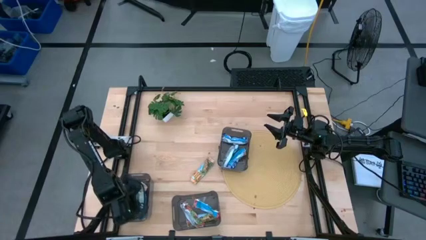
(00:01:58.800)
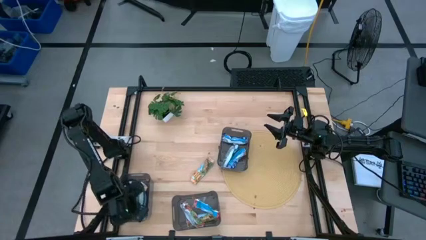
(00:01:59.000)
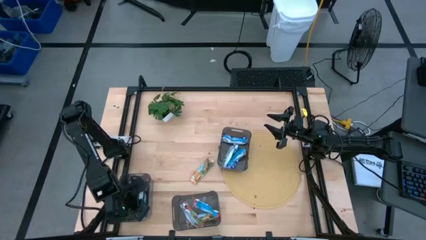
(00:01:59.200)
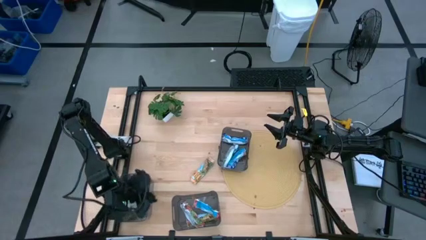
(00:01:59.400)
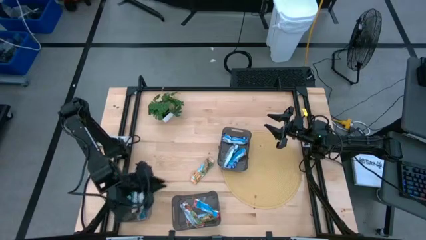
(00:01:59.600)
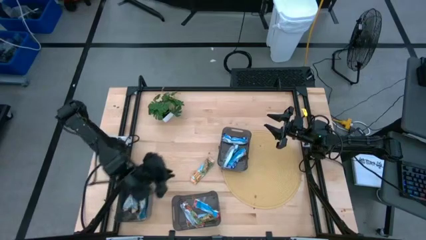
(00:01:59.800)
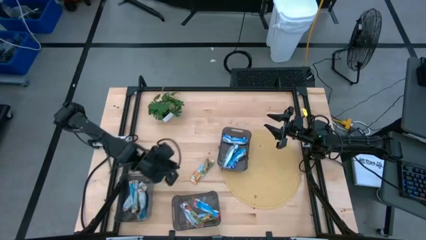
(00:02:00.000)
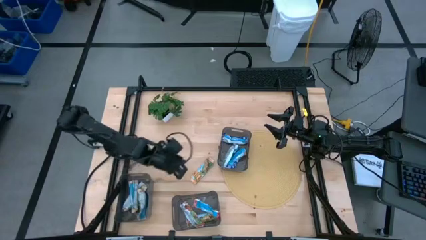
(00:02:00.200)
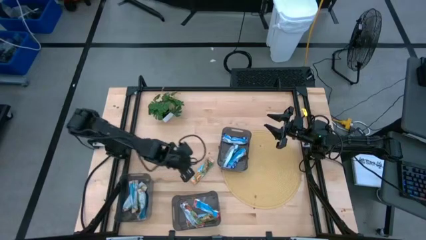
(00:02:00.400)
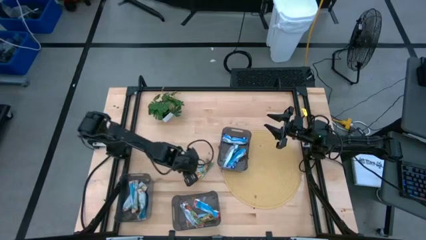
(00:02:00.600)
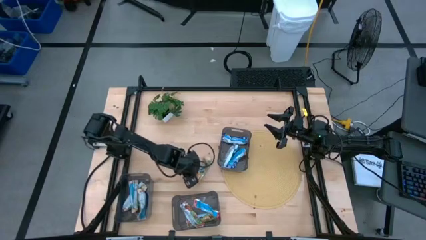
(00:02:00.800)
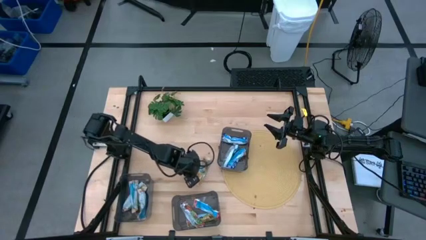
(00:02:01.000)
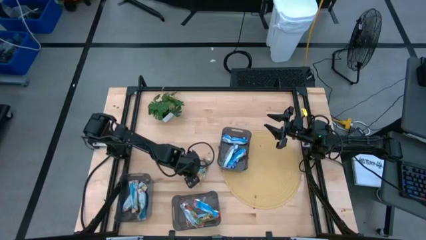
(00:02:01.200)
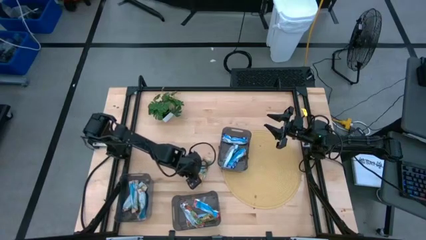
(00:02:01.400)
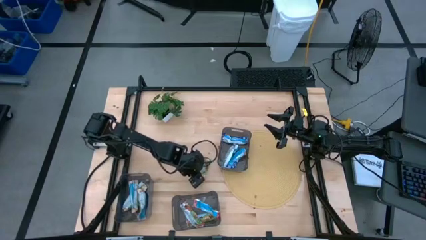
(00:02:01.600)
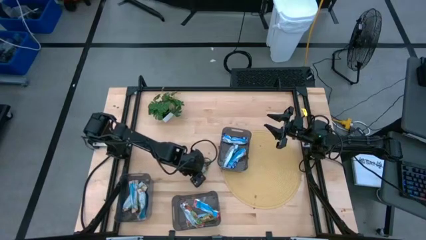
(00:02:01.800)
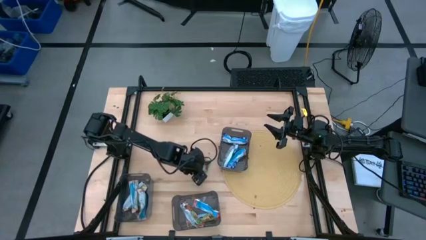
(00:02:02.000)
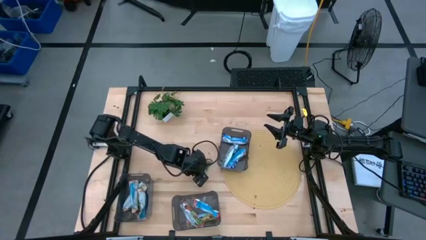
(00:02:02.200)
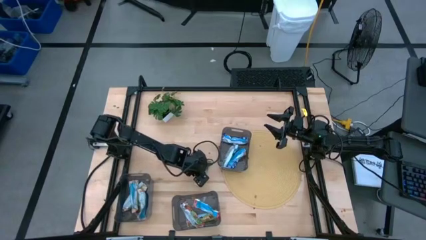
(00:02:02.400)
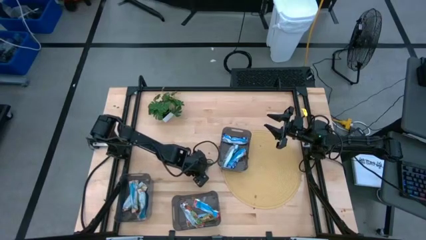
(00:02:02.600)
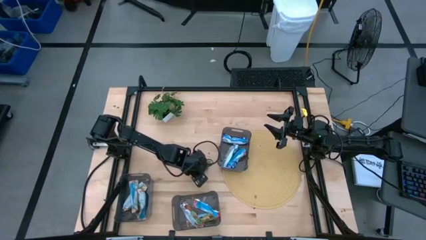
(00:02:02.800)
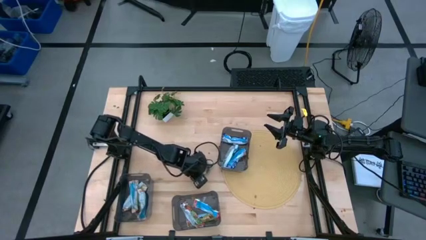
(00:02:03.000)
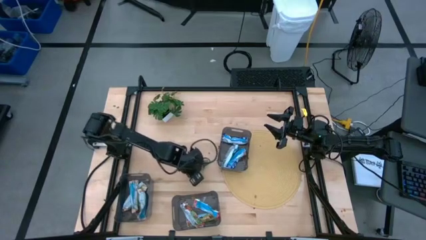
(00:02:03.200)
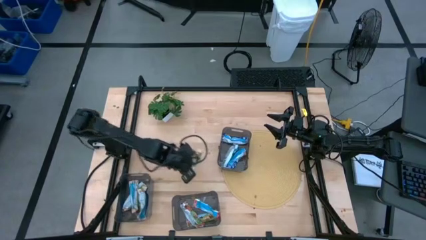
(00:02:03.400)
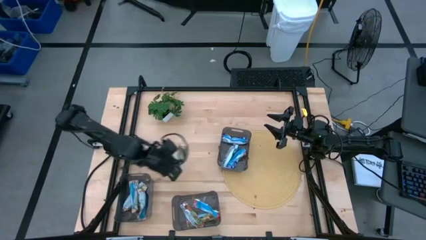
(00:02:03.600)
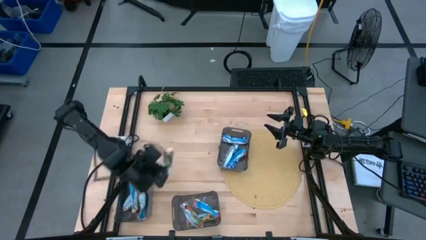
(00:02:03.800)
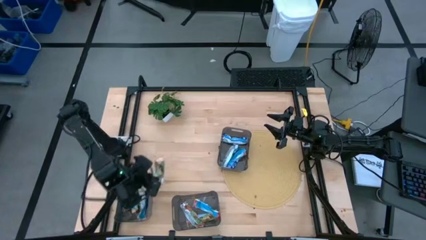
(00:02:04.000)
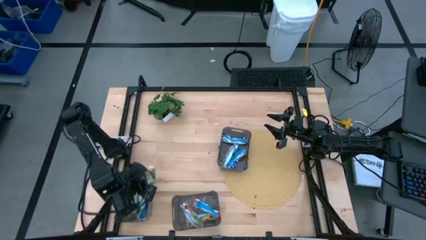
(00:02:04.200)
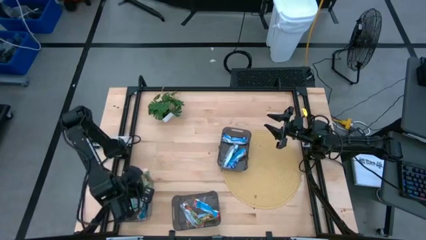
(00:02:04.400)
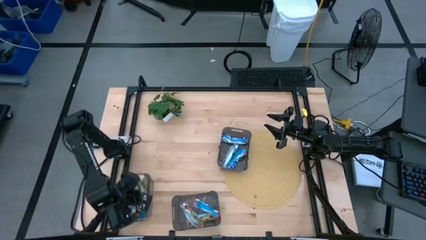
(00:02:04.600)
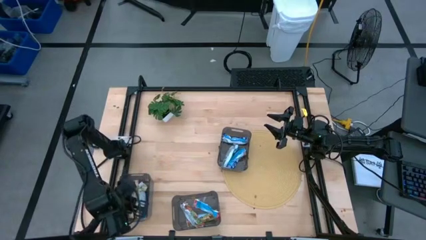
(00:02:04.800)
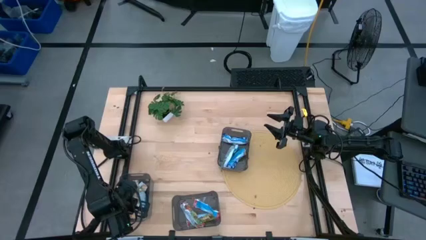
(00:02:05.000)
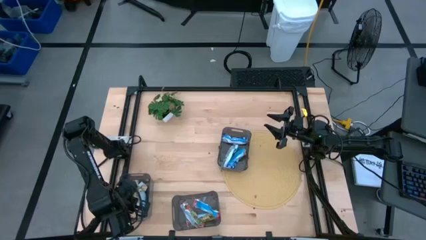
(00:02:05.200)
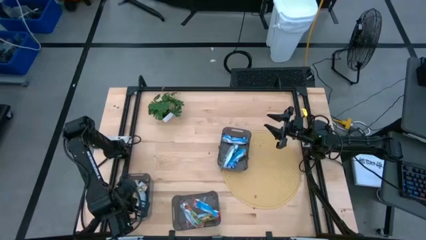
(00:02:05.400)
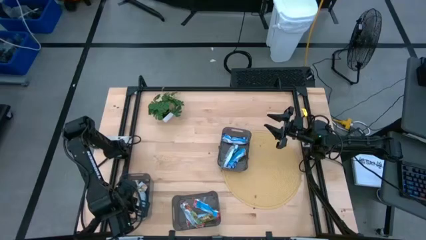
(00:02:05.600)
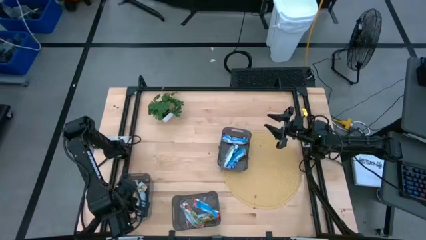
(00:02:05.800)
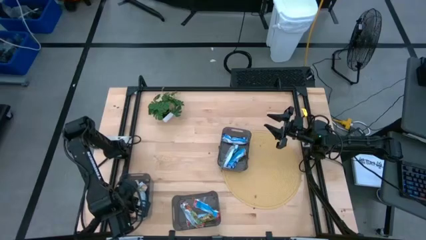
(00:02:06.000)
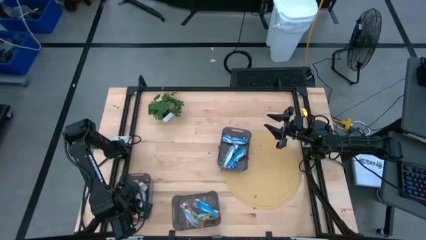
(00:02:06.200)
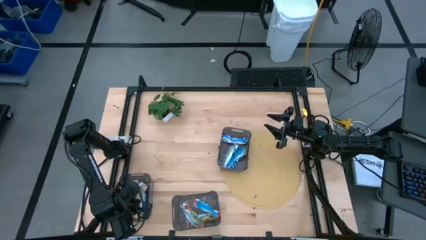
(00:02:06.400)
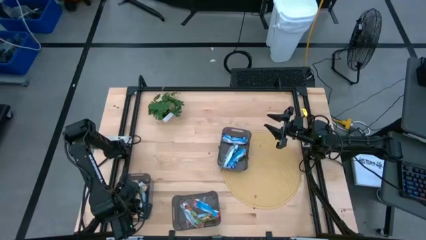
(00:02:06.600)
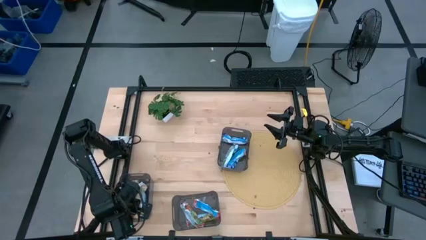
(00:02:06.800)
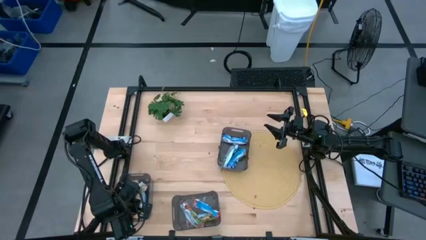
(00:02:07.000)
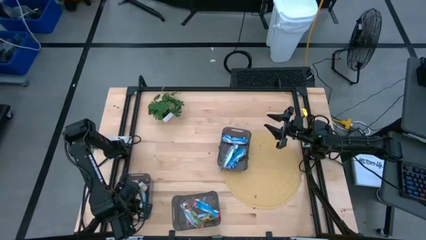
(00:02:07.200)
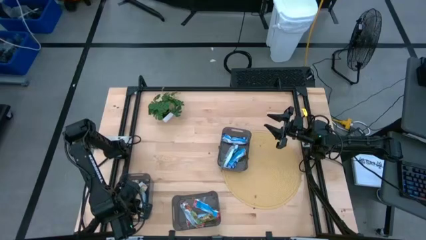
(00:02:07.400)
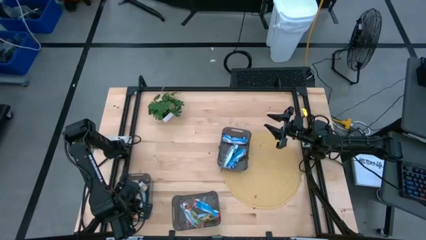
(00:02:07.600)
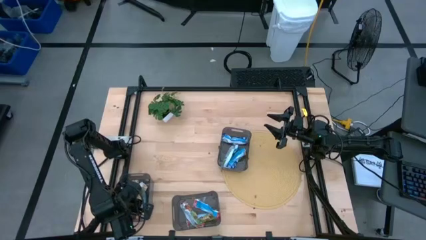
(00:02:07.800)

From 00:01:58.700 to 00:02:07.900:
Task: Pick and place Granola Bars by type
Put the yellow granola bar into the bottom left black bin

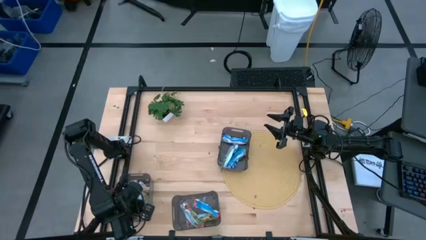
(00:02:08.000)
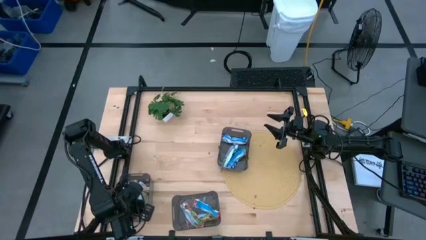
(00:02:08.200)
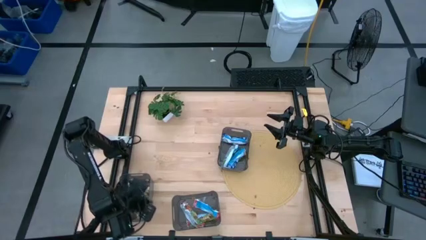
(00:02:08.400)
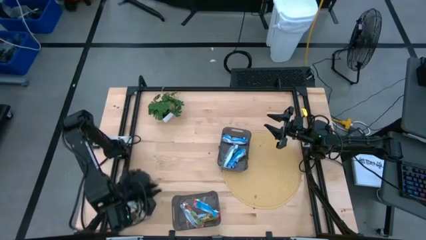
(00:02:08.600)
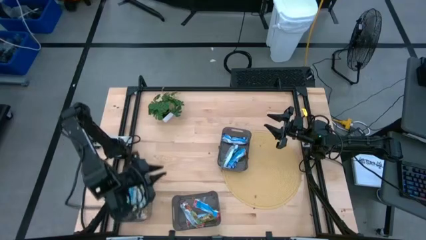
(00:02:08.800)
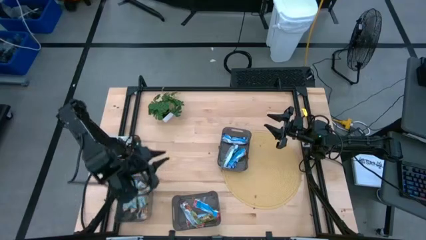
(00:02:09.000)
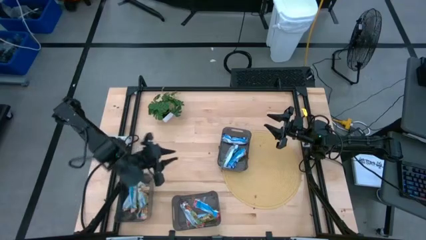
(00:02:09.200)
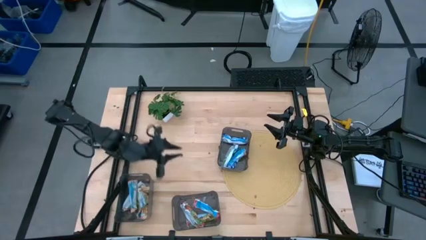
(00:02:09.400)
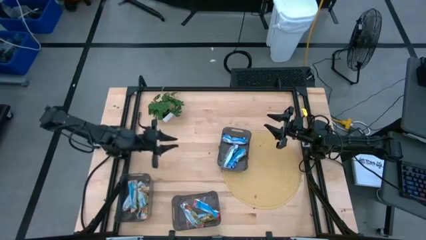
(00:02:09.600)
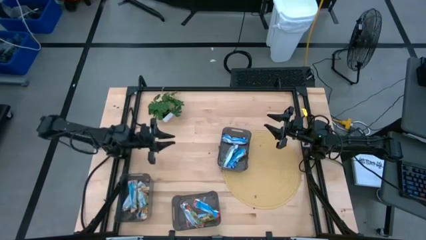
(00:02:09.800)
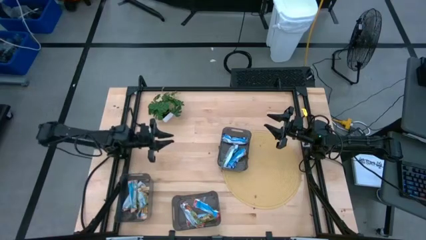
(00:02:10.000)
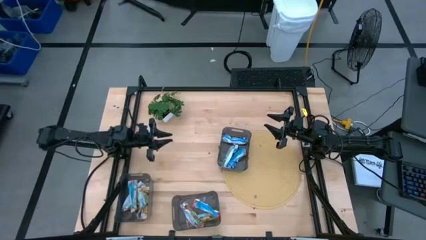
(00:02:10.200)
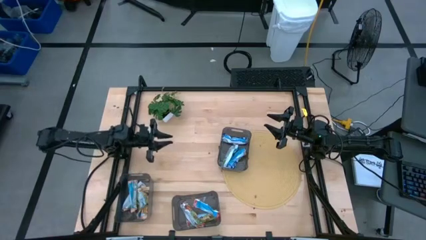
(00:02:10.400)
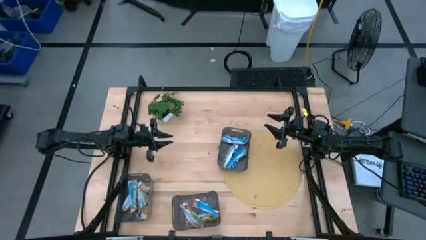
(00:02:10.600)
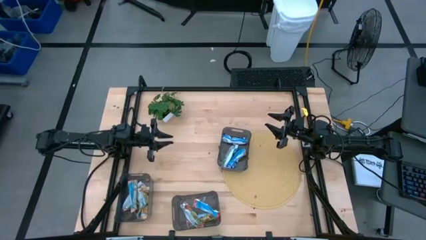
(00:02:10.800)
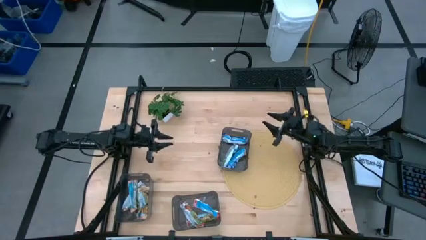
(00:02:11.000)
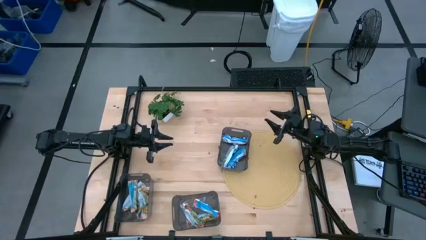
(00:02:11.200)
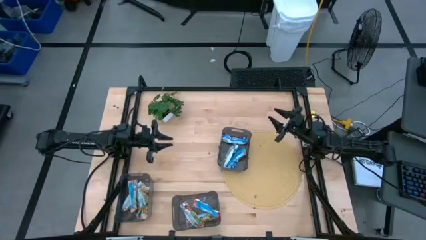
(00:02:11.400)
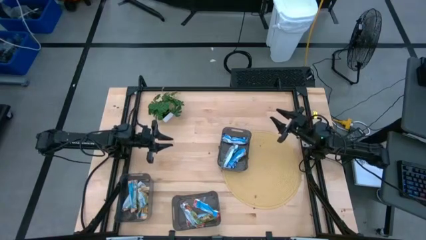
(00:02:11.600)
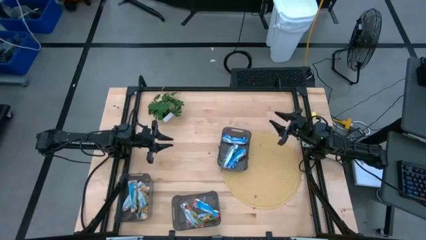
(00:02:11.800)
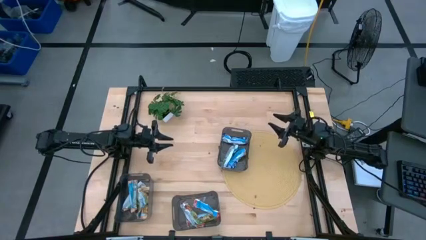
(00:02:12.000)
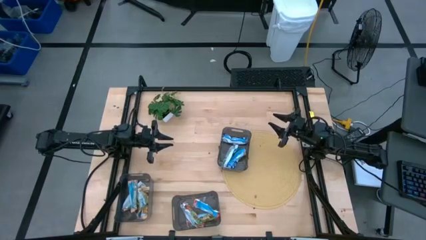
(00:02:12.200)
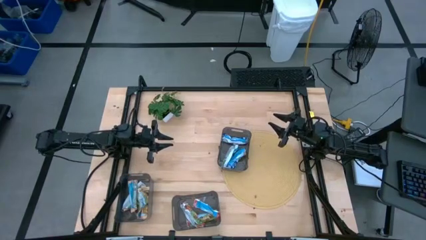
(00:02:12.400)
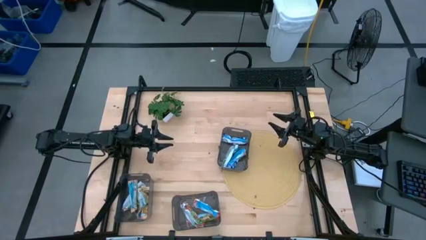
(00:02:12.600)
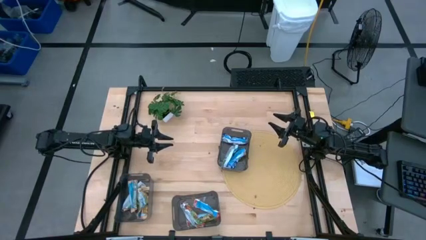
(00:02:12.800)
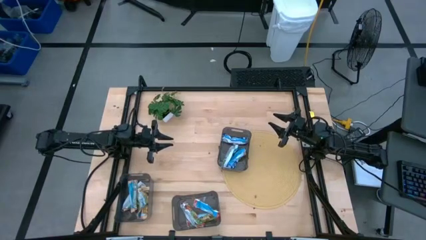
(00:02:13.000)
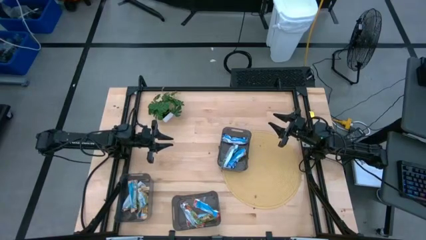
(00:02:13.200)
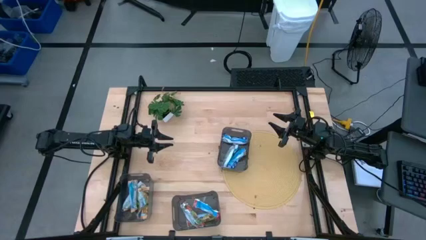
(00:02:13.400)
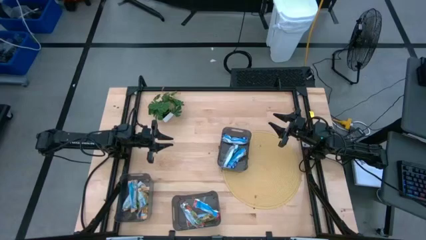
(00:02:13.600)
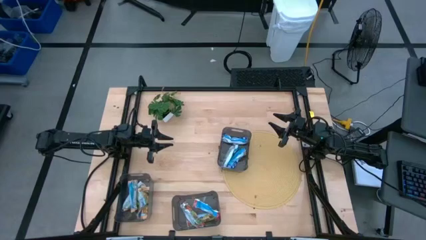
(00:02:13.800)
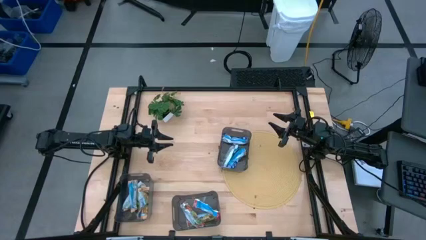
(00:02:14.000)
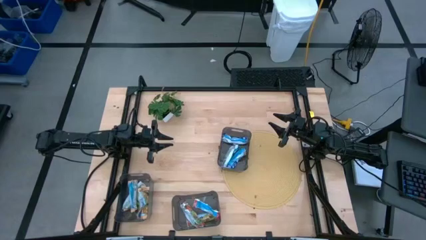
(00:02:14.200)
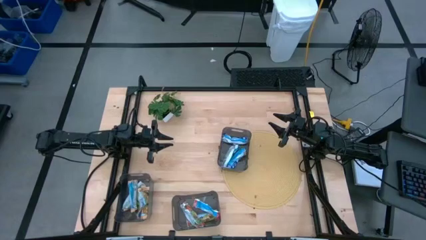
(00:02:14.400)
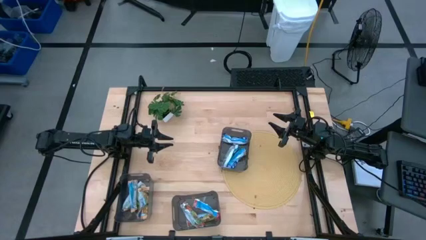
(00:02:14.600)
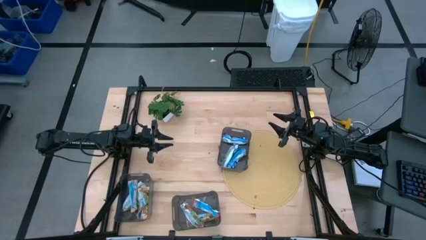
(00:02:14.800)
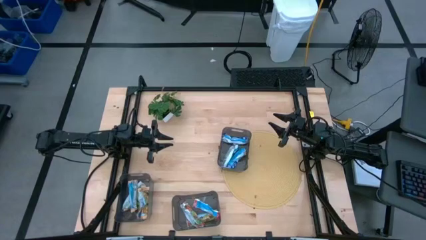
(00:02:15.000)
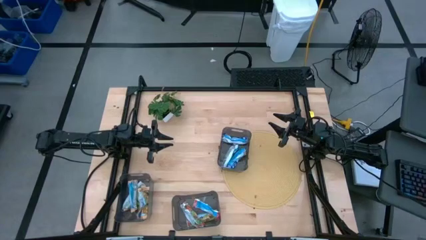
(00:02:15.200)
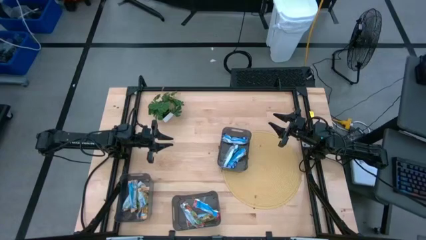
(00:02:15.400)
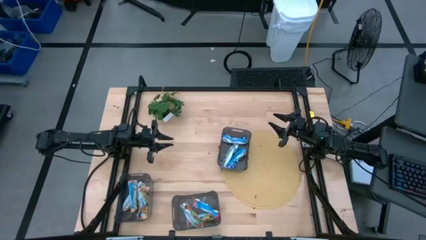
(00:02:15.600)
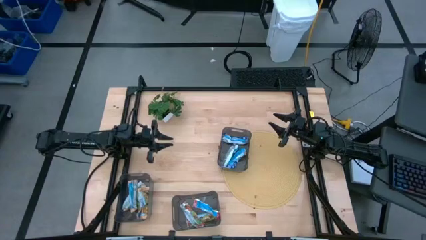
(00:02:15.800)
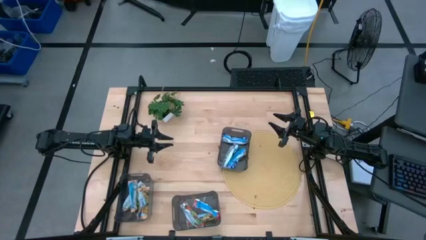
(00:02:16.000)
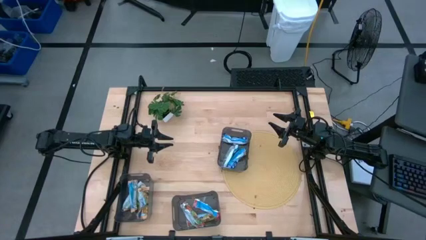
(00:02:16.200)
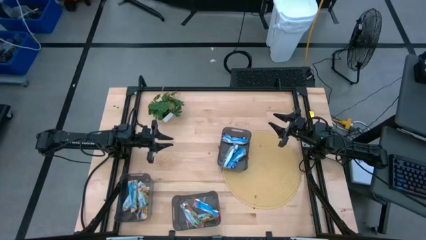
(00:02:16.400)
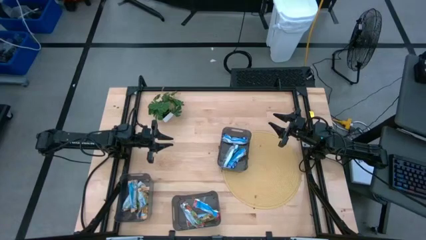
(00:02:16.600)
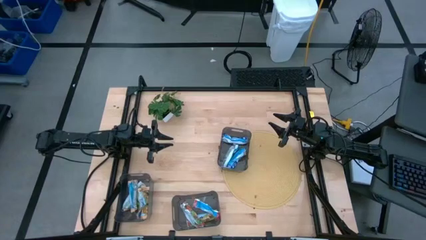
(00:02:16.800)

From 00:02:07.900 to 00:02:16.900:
Return to Home Position
